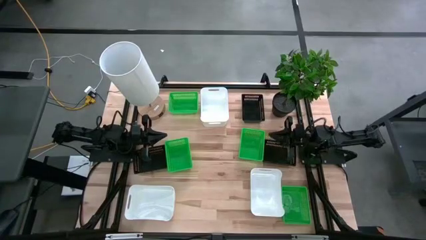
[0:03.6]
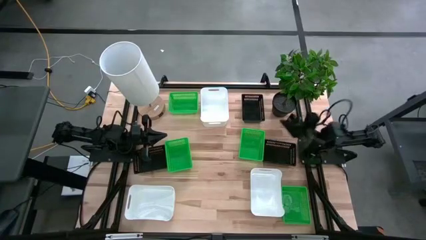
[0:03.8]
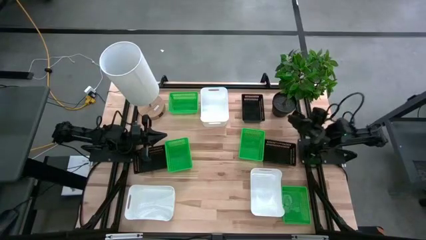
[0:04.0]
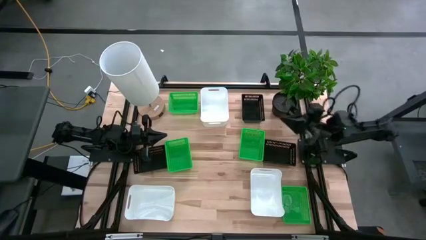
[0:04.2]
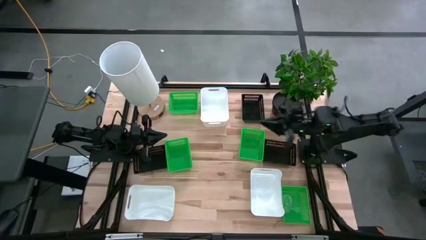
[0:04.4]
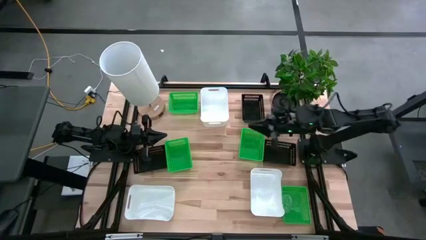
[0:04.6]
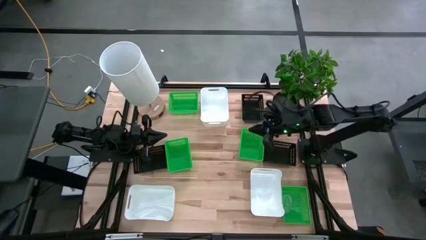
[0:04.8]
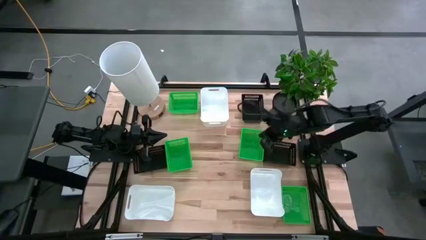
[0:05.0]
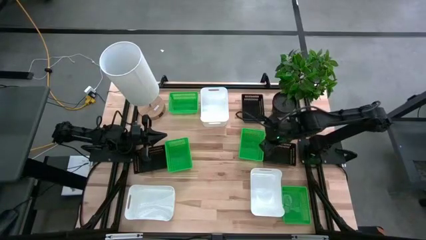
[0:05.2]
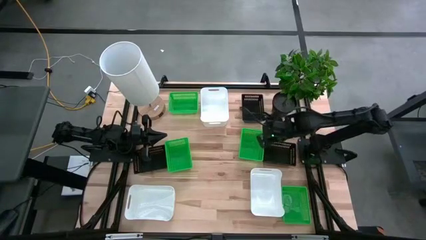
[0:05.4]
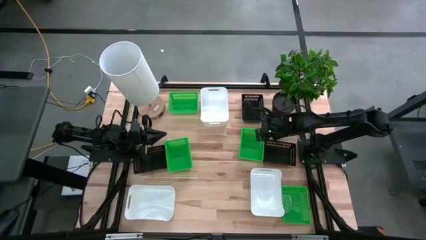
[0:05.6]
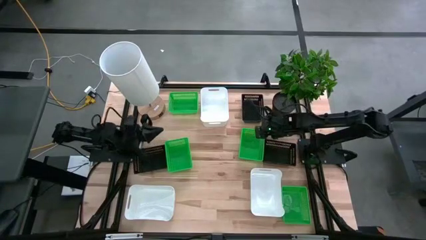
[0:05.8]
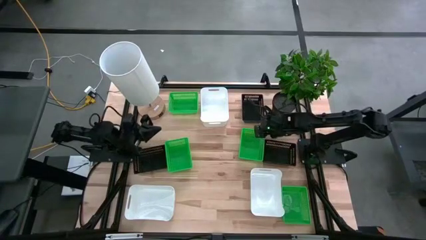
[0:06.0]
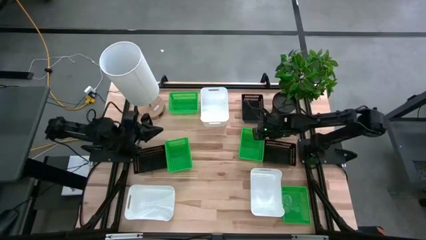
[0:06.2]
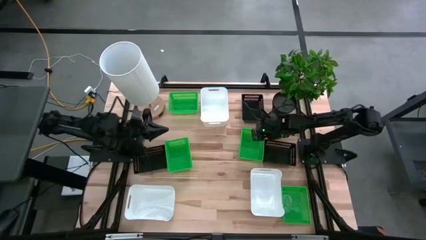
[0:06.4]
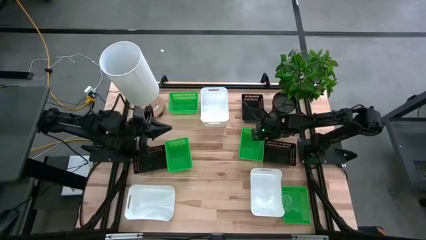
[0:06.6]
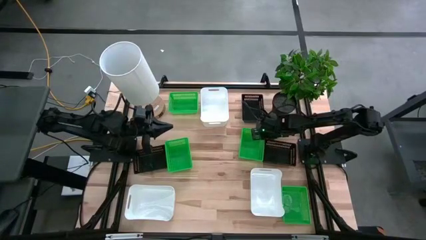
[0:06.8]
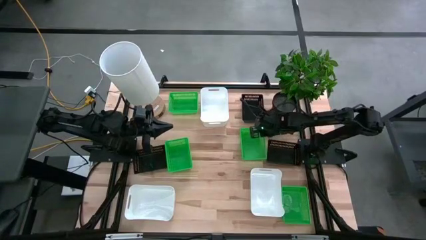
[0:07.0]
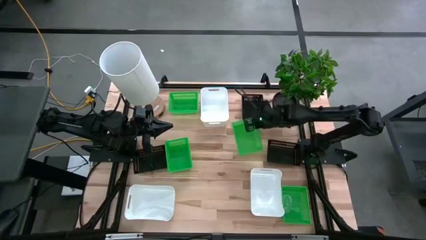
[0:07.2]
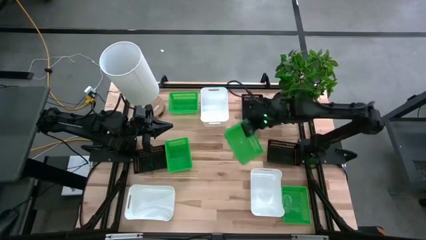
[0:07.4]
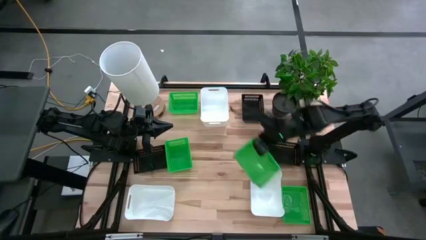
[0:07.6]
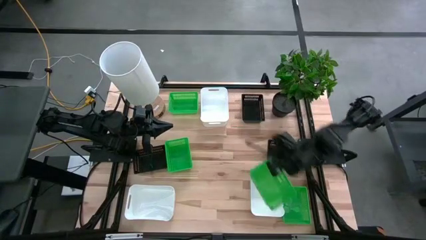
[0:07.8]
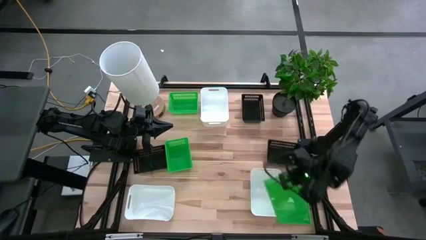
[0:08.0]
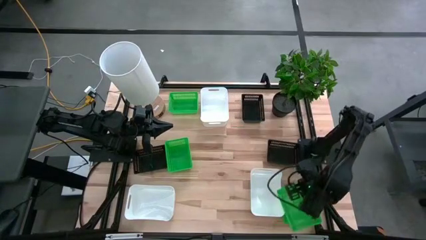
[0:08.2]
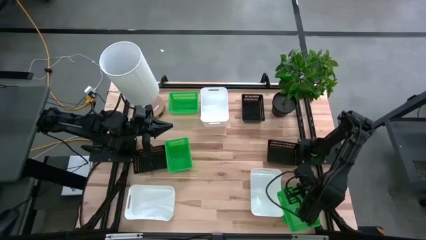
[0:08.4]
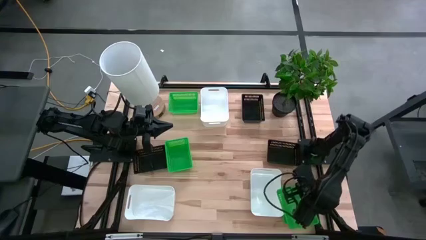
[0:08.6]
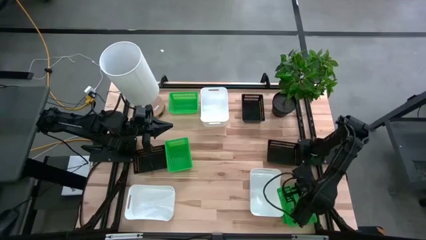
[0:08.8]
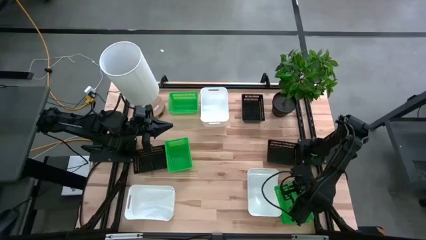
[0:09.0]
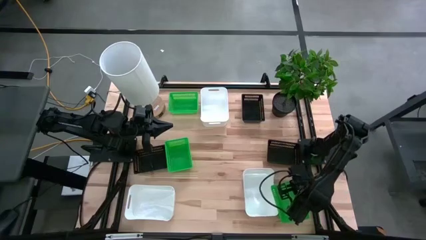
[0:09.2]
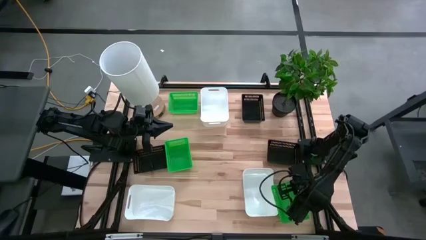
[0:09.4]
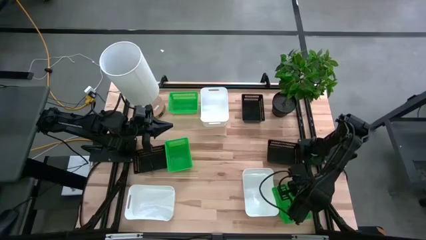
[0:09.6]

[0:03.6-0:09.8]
Stack the middle right green bin on top of the bottom green bin

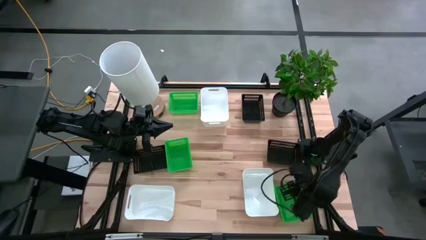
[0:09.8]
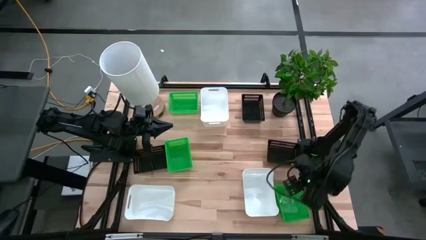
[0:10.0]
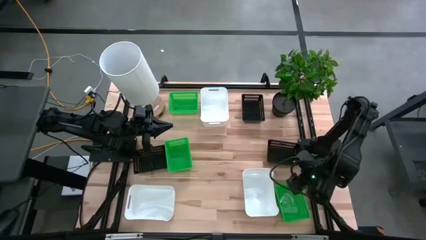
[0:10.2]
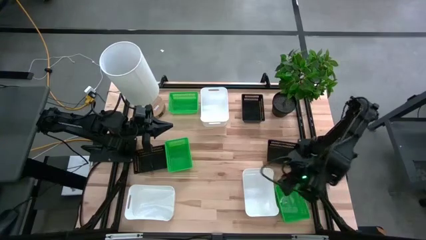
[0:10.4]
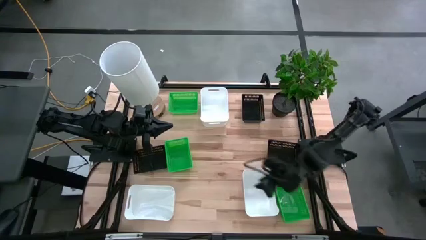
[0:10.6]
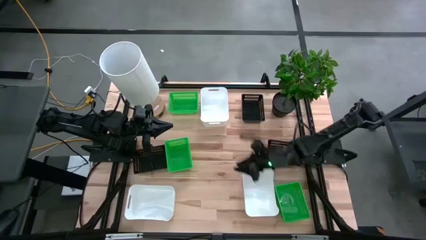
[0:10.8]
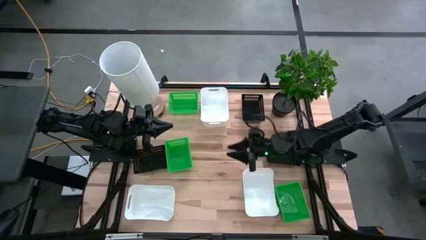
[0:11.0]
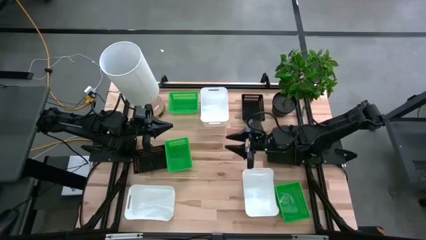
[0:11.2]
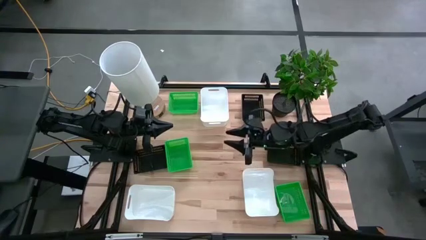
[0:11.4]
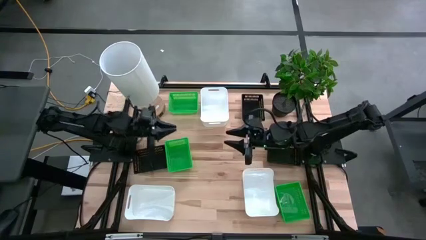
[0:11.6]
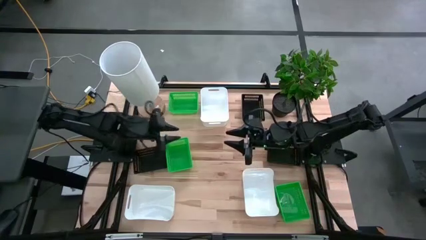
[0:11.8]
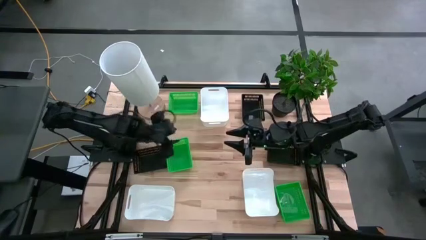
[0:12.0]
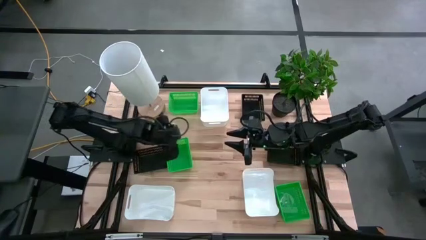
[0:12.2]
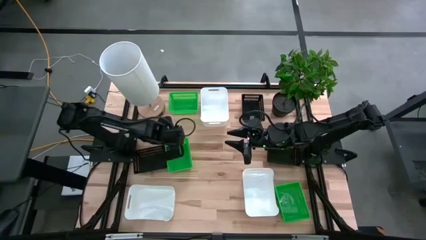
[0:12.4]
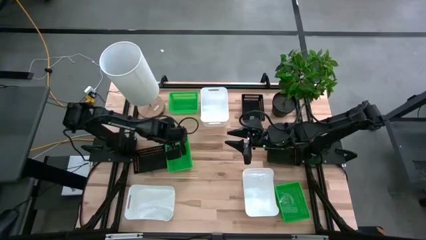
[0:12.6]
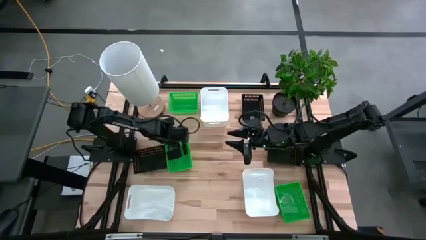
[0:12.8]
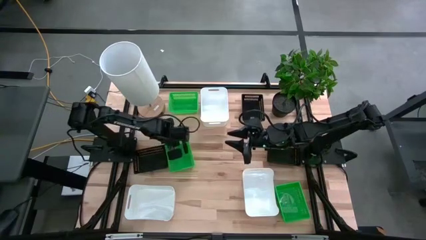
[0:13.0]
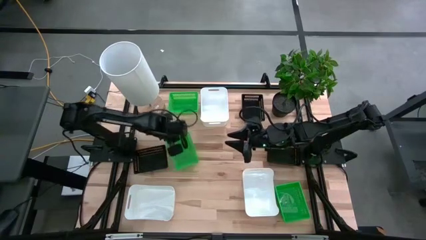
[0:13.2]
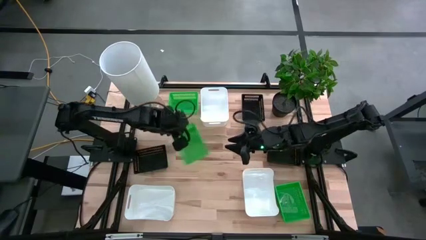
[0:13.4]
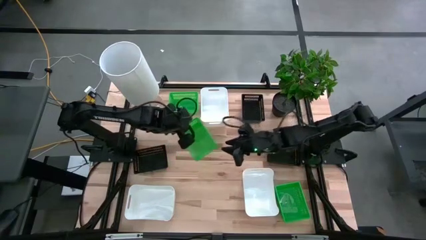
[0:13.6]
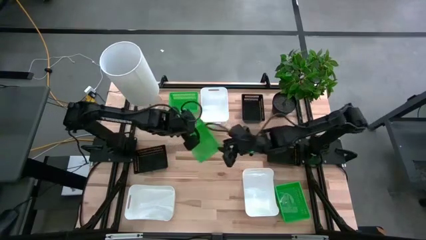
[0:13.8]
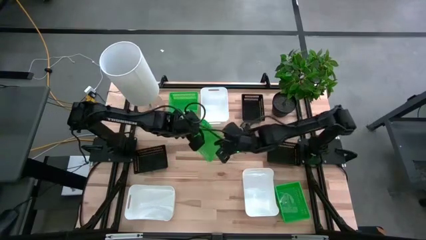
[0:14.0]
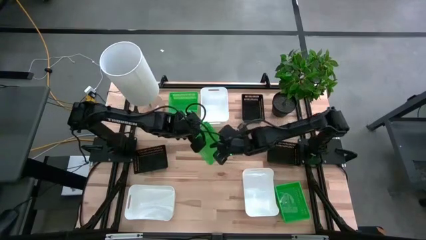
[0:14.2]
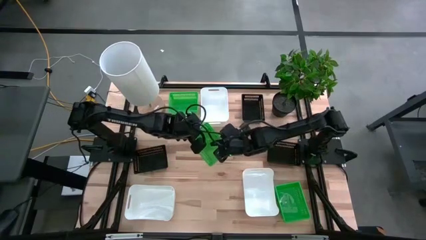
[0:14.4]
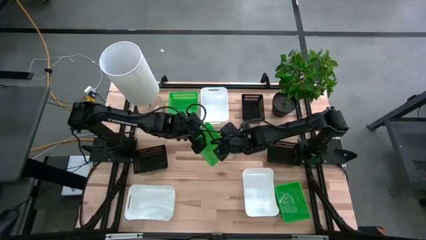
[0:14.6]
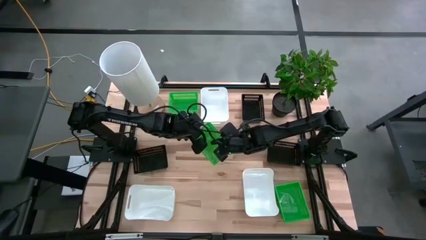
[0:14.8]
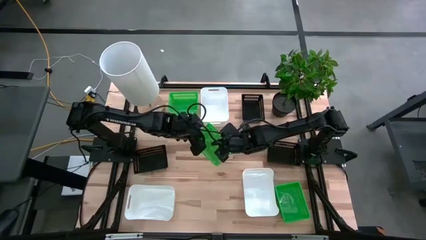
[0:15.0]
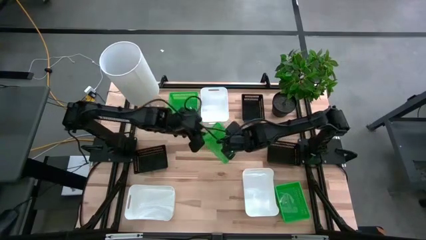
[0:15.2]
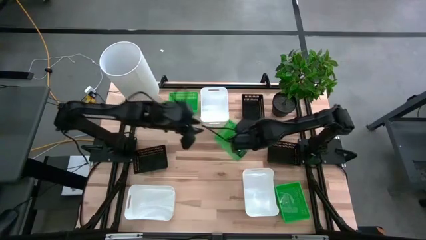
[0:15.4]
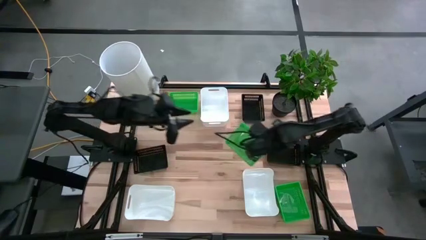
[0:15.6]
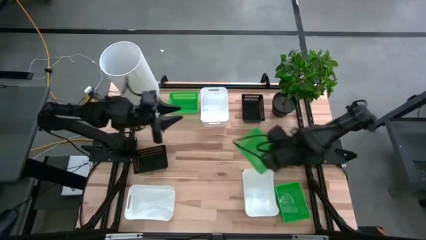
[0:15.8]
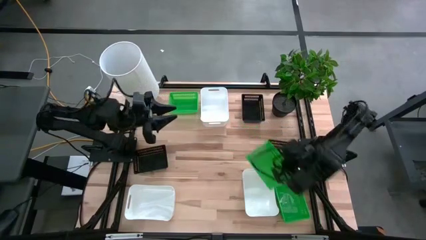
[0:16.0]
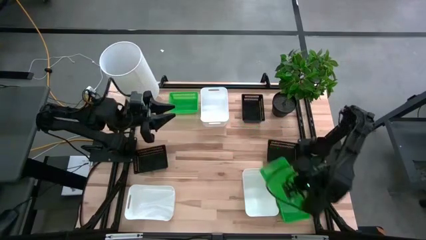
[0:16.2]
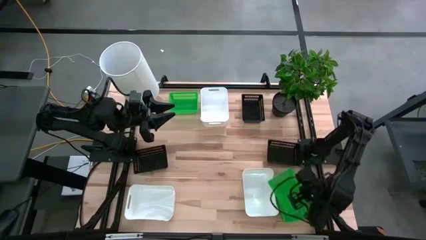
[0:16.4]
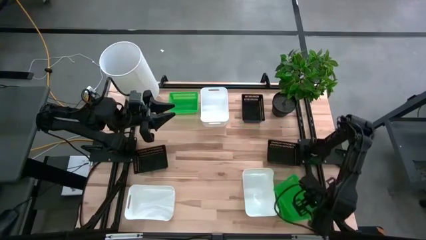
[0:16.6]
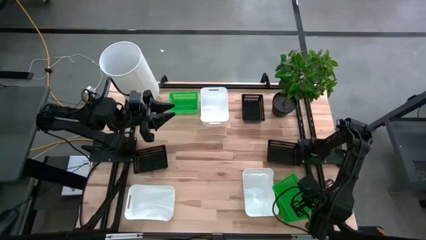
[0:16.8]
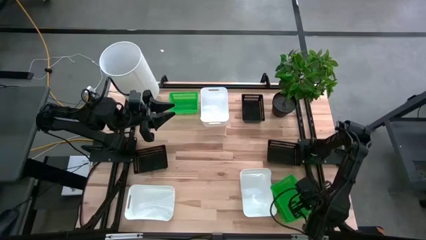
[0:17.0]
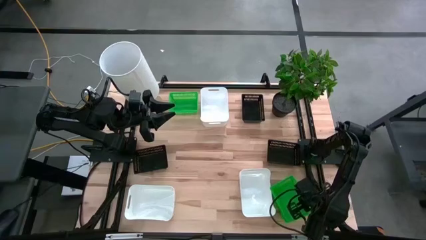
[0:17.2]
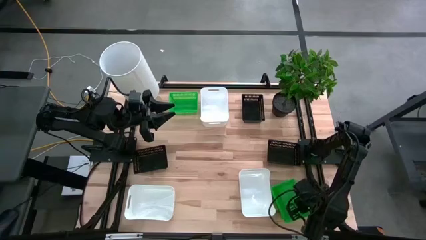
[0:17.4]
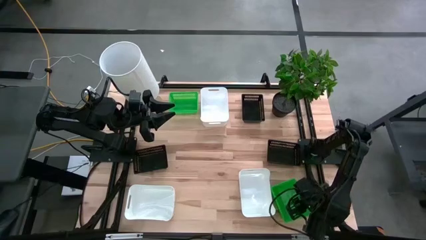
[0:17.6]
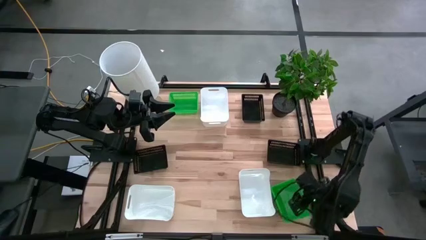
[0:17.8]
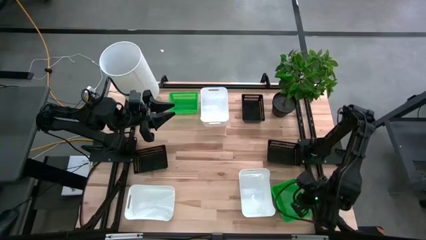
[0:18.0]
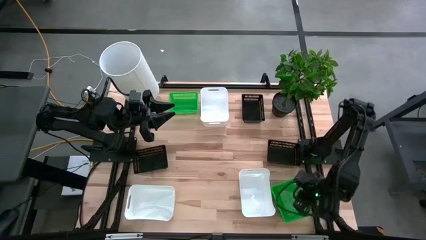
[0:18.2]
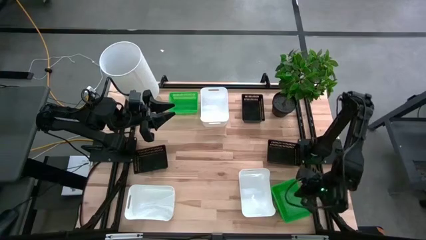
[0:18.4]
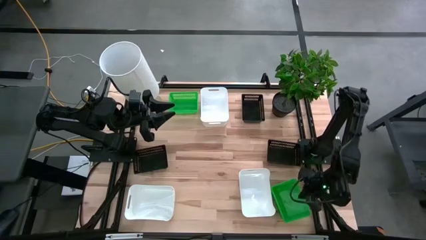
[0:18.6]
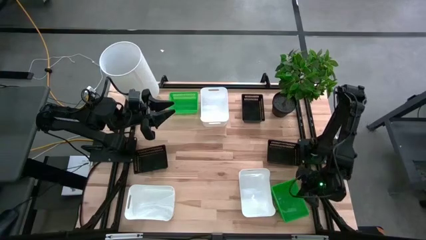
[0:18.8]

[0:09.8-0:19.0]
Stack the middle green bin on top of the bottom green bins
